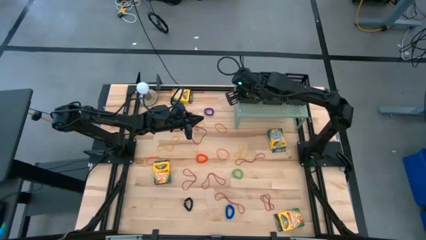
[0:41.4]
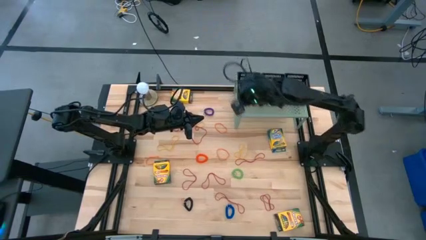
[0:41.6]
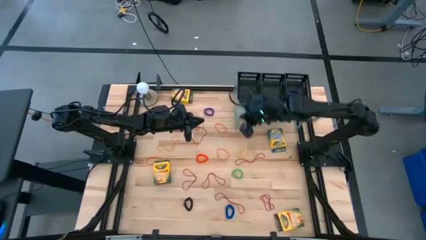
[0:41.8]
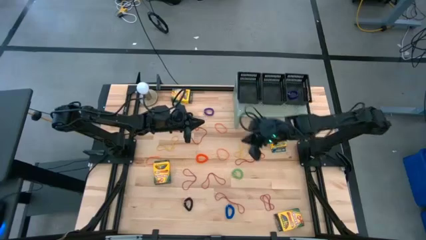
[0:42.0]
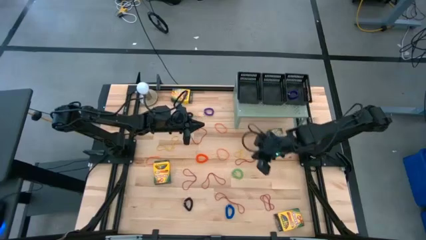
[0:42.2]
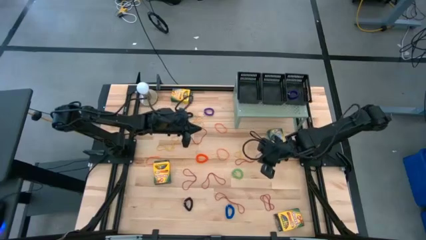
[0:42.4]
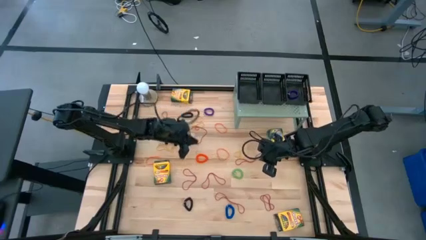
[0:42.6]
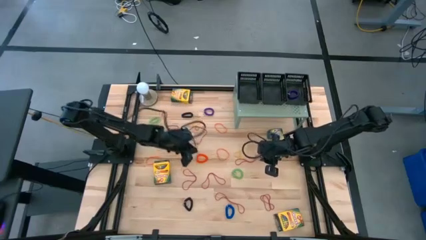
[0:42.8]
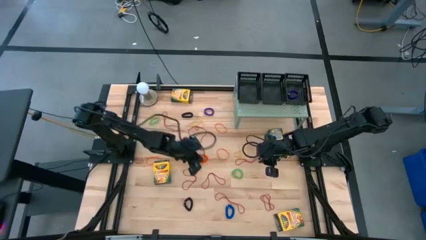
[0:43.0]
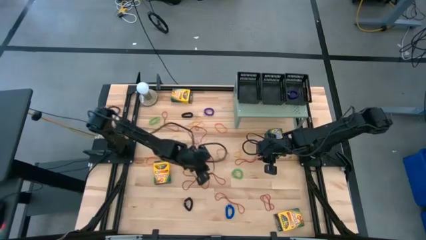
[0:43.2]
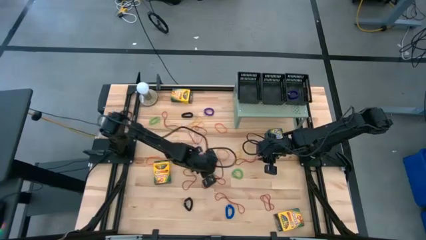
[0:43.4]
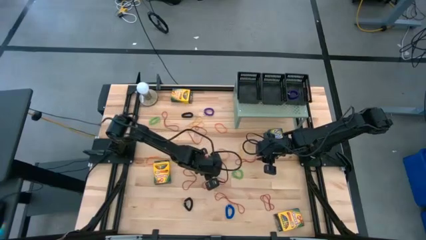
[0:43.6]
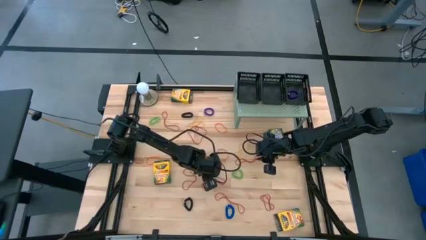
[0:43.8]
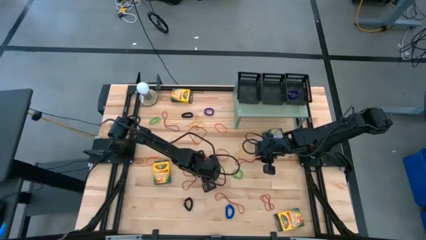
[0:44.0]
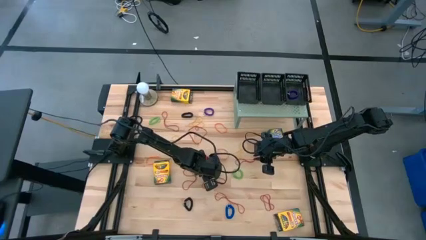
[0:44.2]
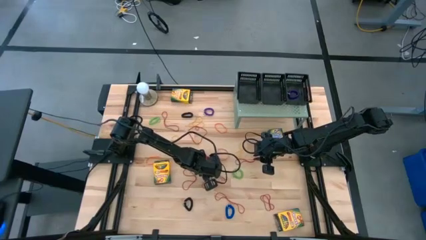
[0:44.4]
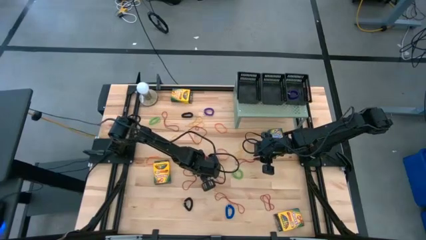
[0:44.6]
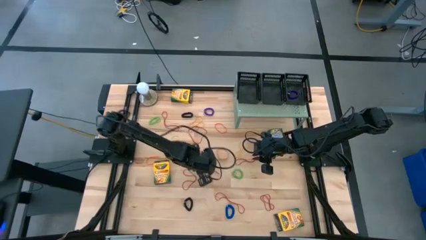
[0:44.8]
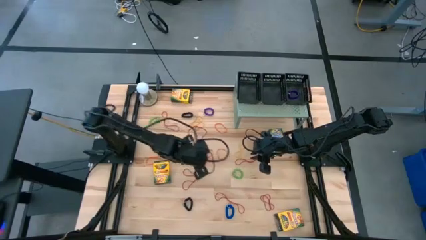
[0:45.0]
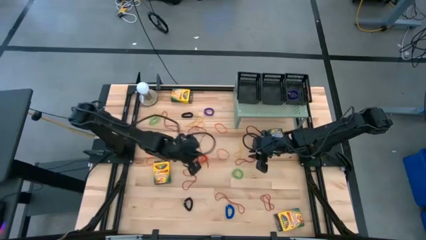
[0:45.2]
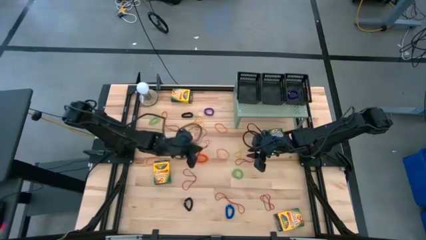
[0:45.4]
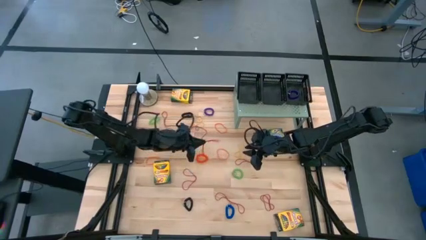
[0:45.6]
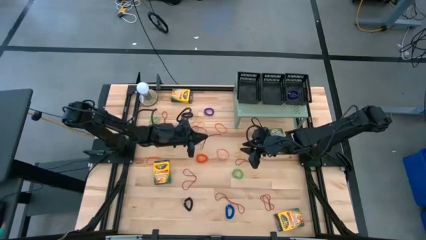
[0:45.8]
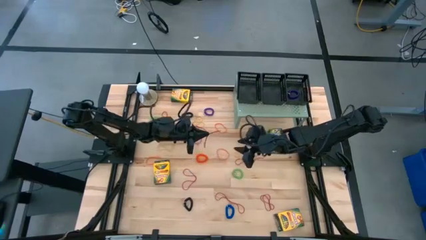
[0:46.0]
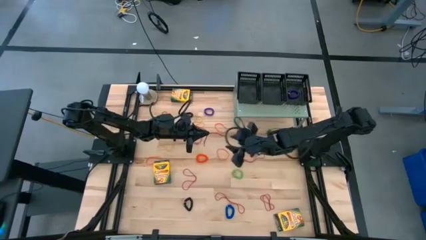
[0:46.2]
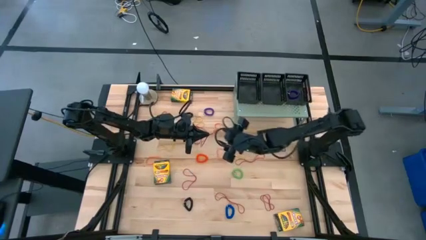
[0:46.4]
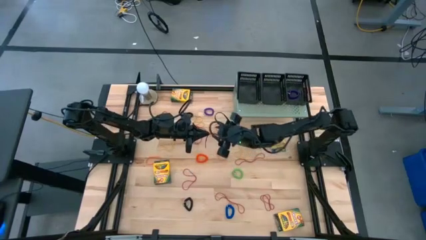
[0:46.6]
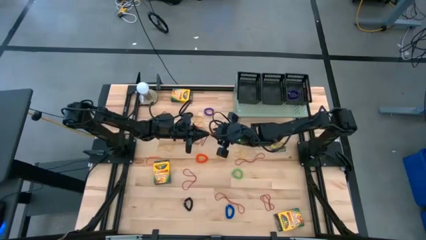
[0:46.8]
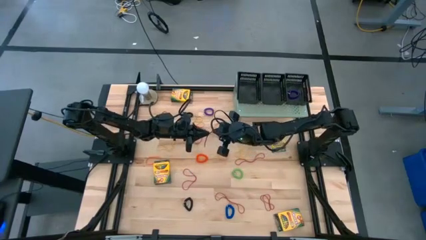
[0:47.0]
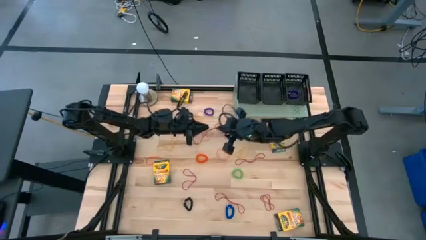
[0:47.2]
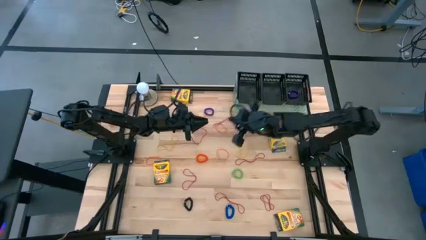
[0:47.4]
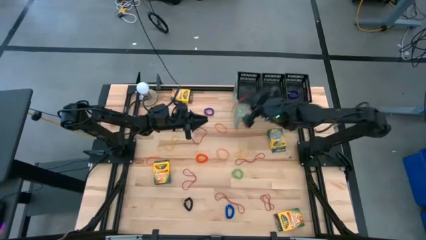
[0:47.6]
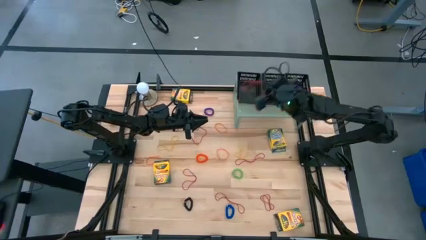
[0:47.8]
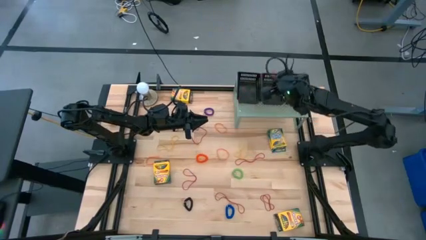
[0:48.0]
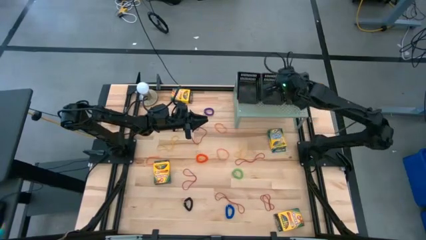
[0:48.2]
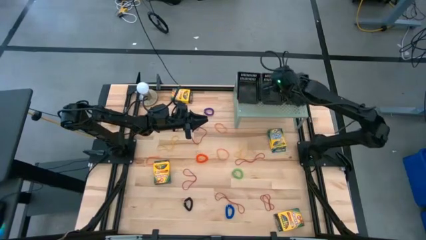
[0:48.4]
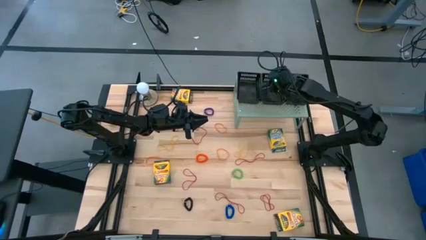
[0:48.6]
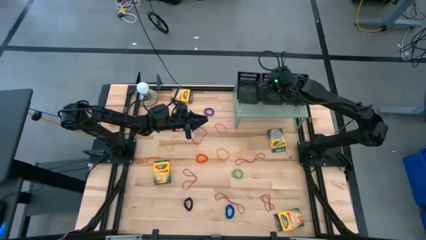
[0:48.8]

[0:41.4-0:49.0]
Task: Pick & Place Office Desk Supplies
Put the red rubber band into the middle black basket on the shelf

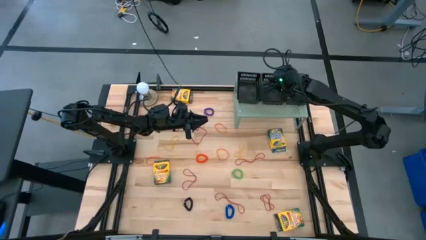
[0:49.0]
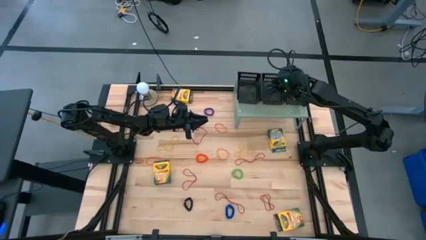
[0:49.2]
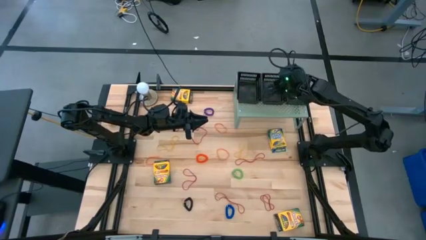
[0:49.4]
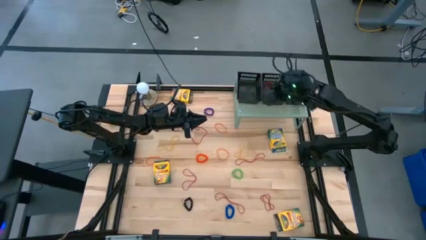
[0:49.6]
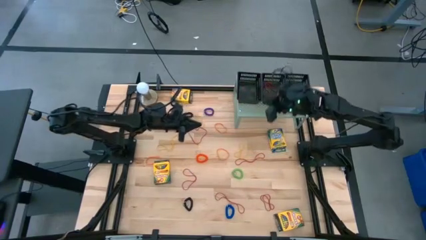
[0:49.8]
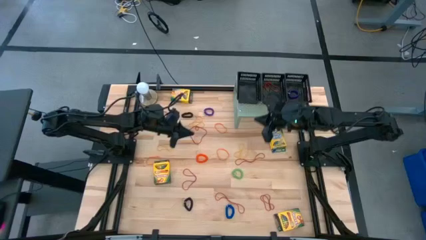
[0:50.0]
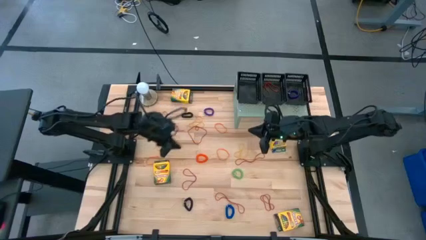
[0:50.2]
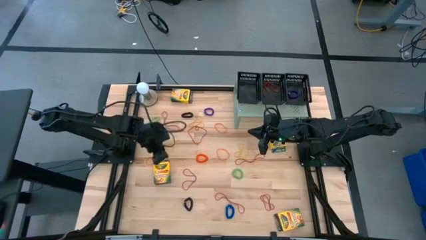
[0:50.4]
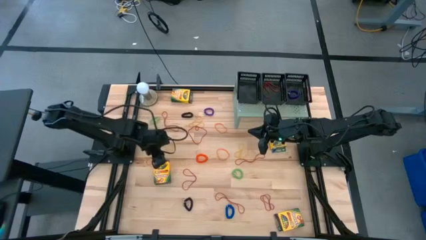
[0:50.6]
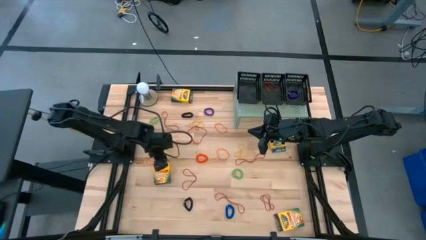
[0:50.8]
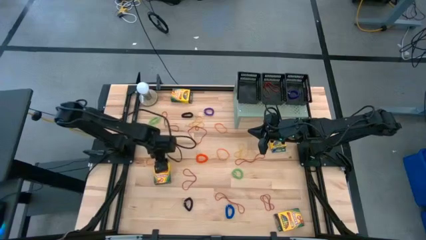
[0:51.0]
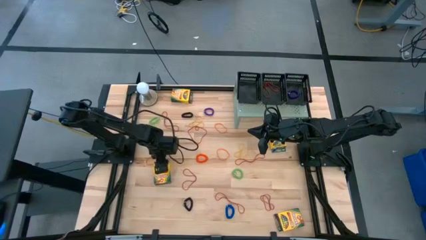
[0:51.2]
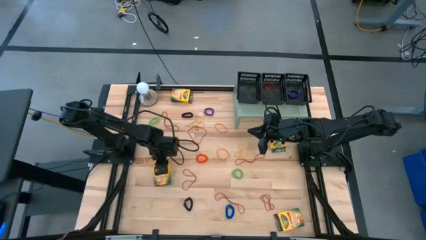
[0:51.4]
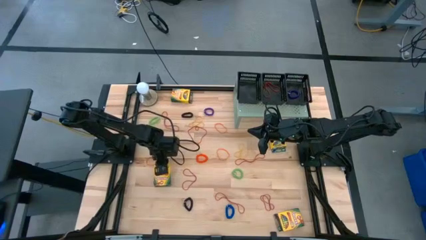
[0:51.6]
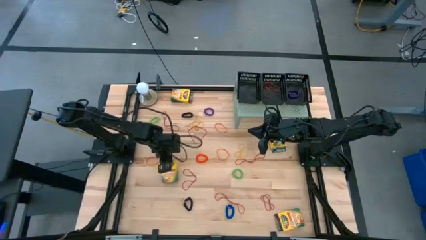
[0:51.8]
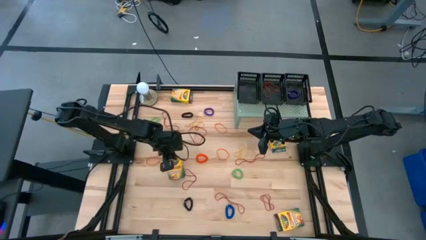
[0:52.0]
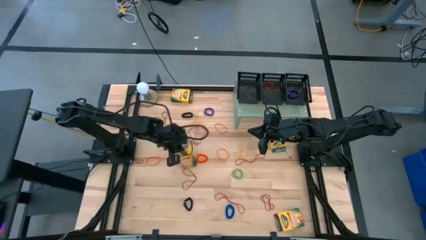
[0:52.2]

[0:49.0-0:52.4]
Put the yellow crayon box into the left black basket on the shelf

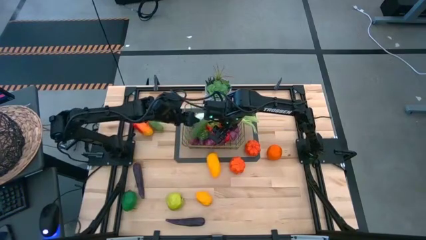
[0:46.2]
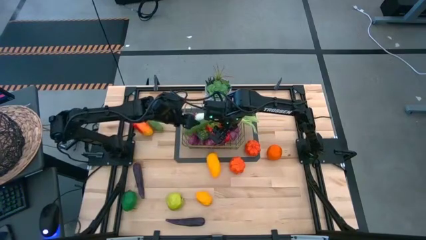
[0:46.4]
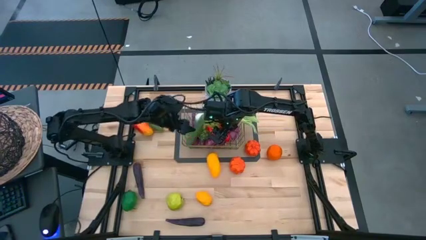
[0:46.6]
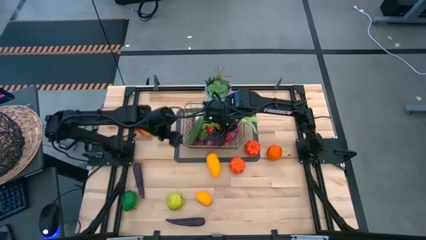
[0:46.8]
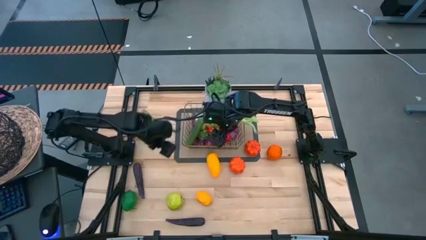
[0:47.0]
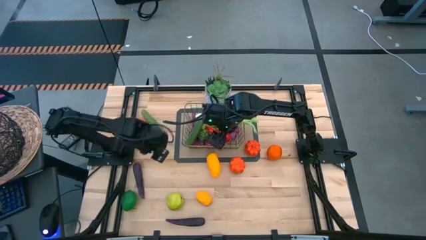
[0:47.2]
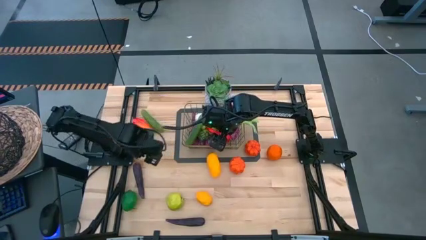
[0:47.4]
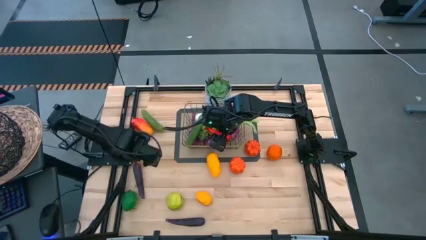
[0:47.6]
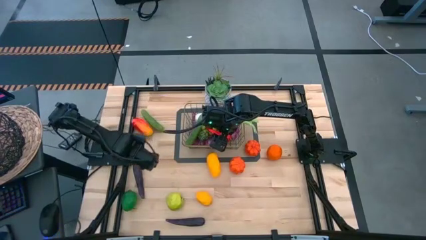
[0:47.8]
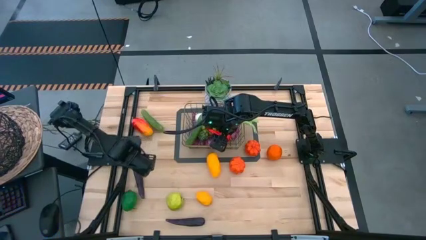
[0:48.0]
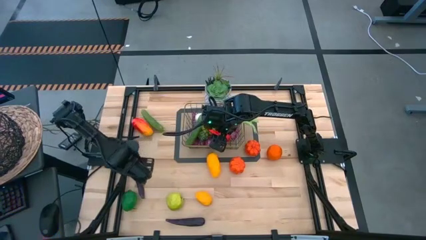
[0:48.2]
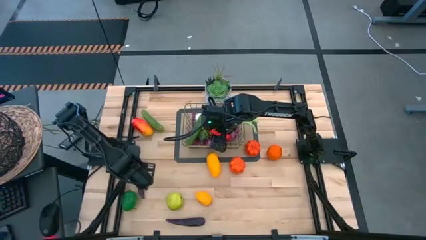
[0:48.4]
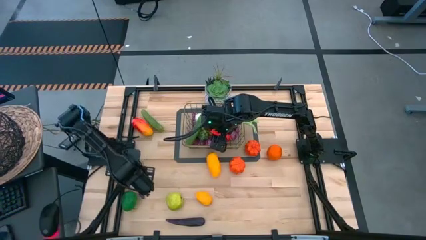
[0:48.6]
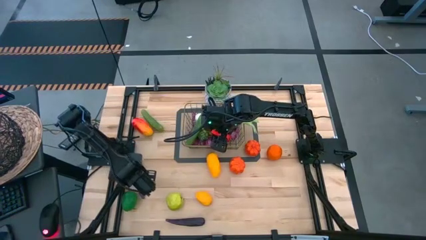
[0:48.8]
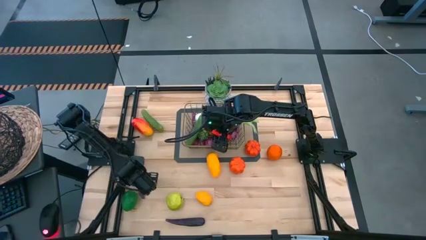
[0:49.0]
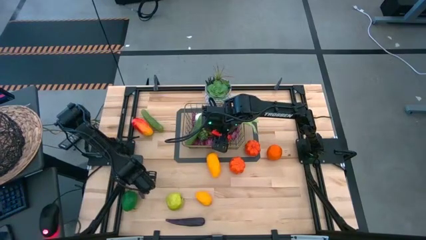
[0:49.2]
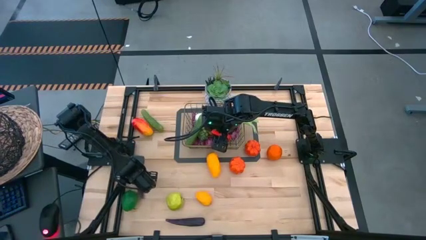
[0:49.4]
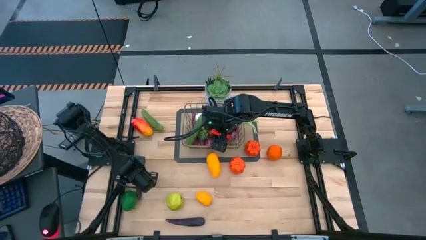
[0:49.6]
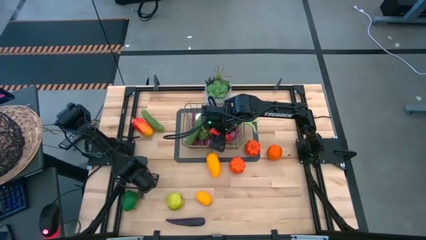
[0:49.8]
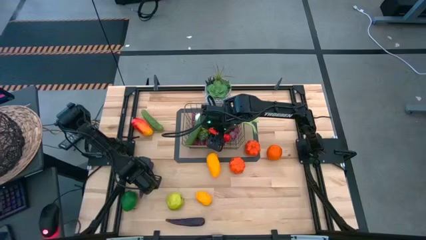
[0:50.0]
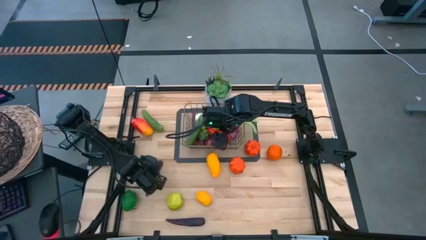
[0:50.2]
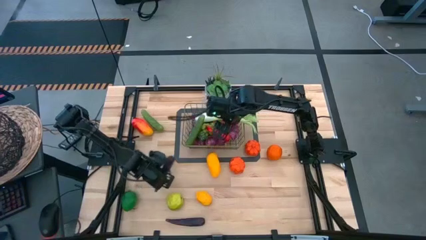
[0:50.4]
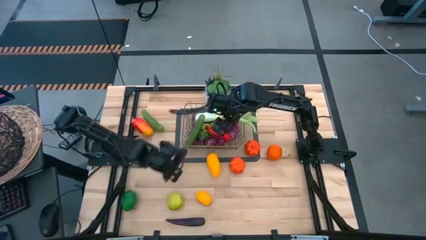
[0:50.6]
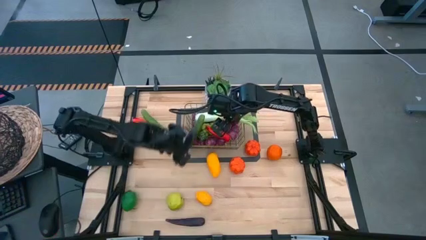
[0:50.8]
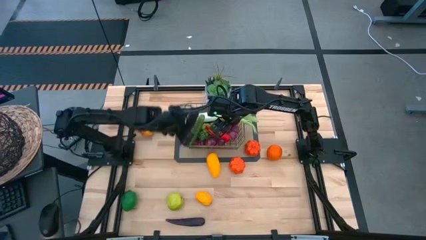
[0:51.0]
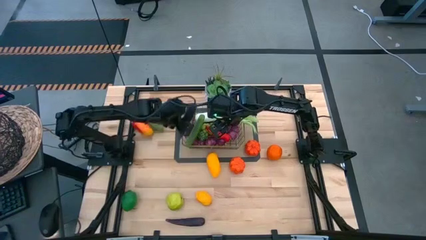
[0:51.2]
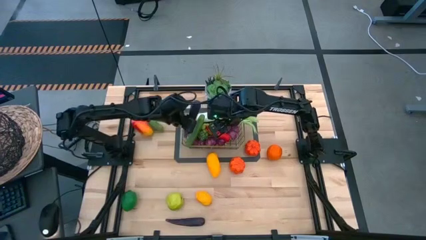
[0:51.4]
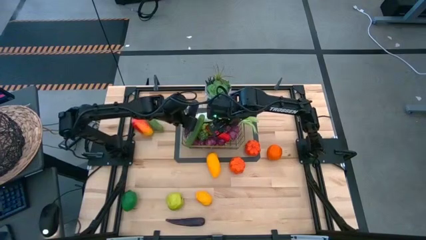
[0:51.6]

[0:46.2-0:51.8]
Task: Build produce basket
Put the top eggplant into the wire basket
